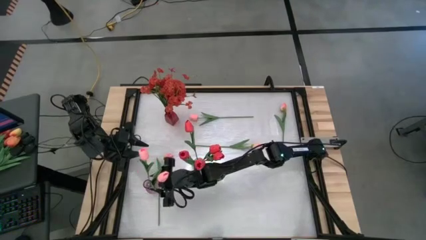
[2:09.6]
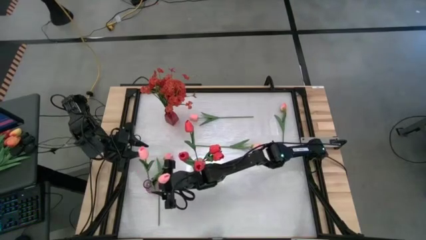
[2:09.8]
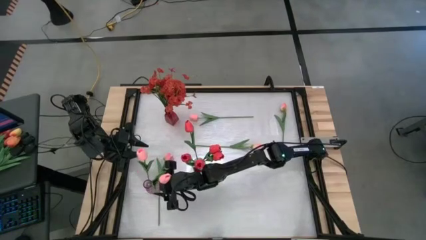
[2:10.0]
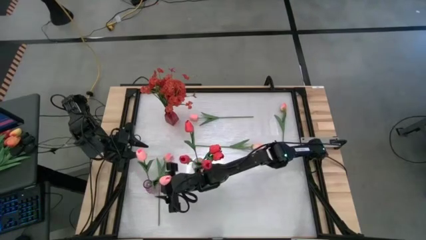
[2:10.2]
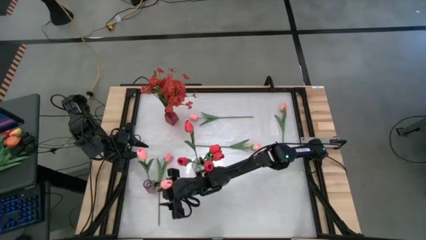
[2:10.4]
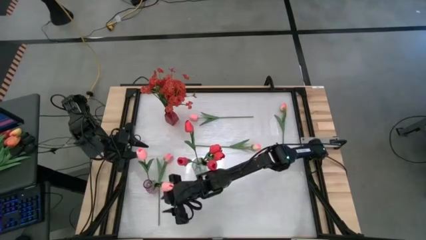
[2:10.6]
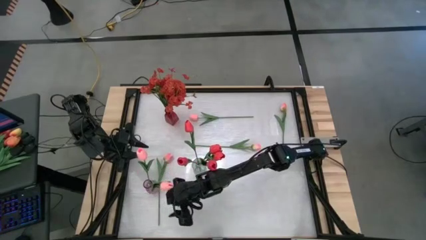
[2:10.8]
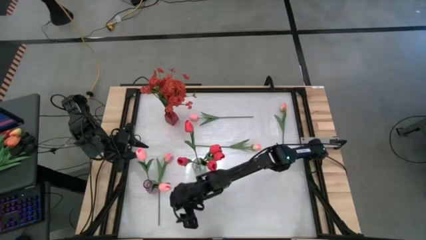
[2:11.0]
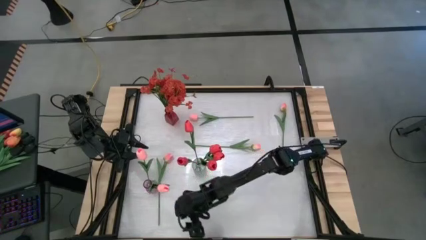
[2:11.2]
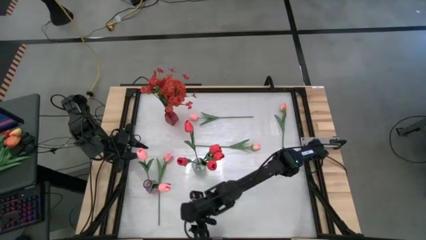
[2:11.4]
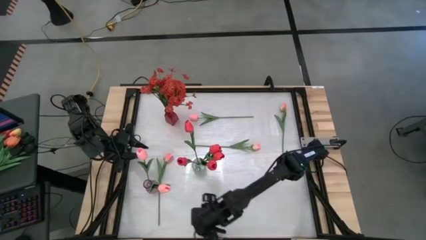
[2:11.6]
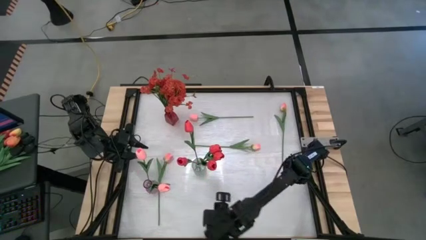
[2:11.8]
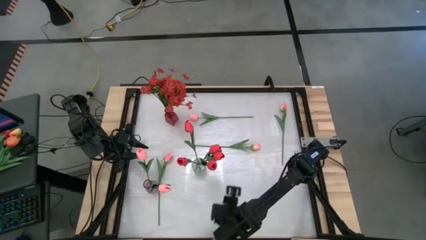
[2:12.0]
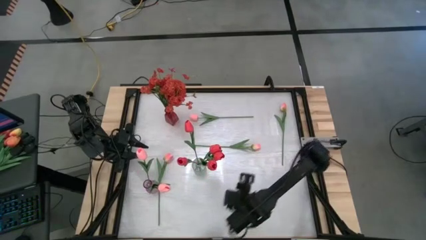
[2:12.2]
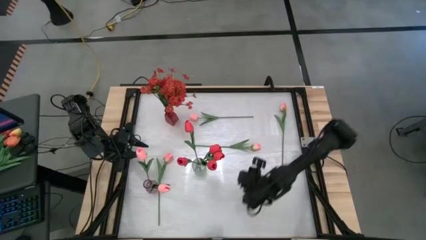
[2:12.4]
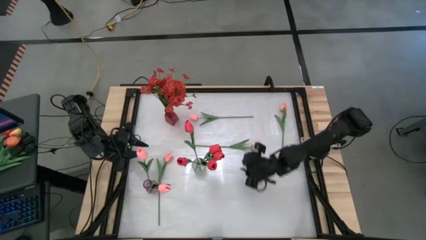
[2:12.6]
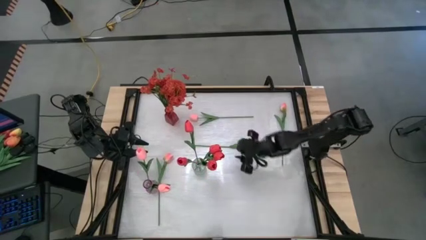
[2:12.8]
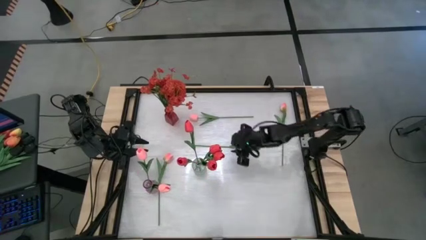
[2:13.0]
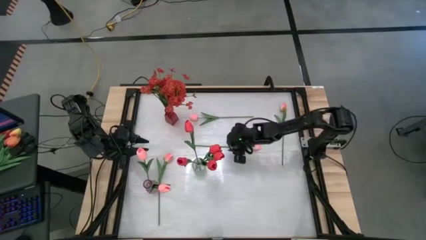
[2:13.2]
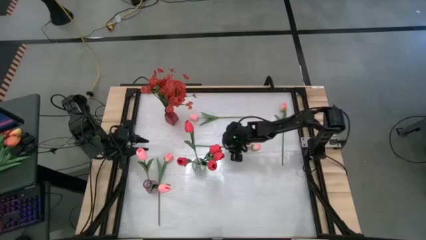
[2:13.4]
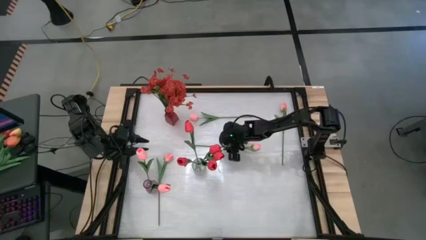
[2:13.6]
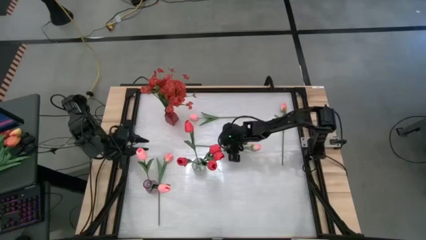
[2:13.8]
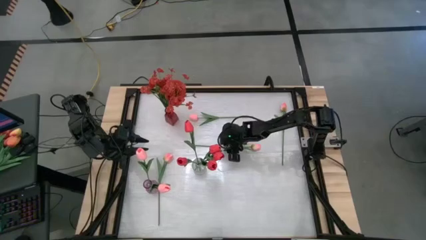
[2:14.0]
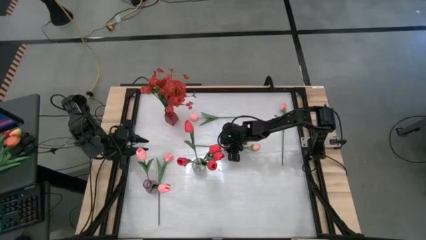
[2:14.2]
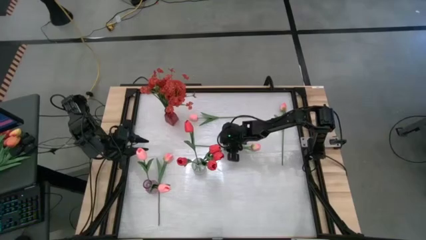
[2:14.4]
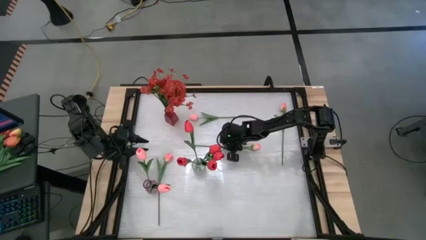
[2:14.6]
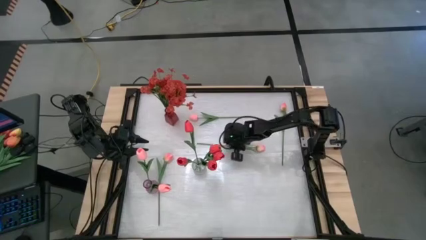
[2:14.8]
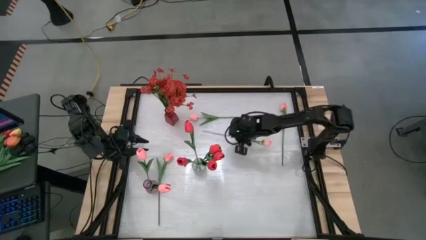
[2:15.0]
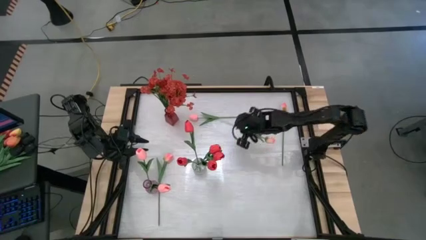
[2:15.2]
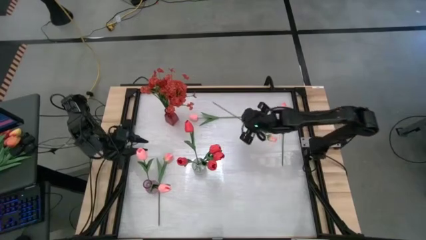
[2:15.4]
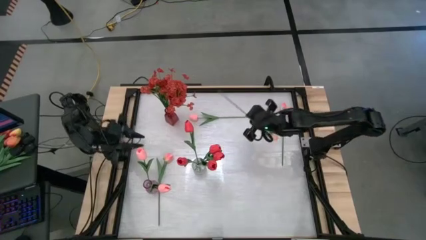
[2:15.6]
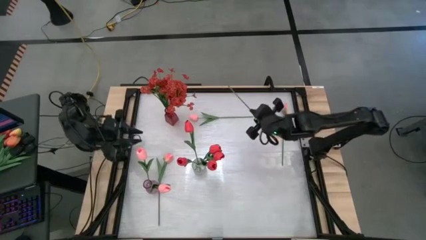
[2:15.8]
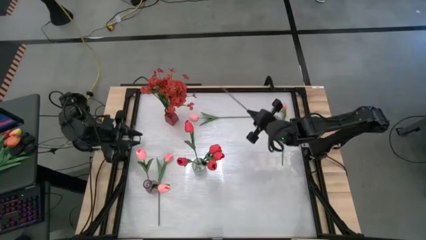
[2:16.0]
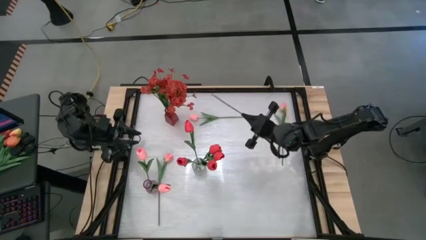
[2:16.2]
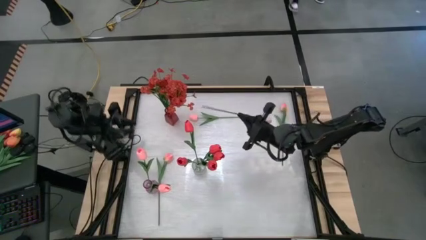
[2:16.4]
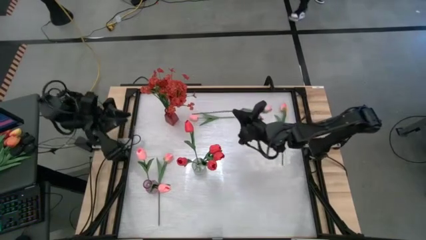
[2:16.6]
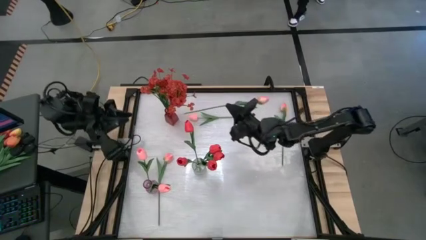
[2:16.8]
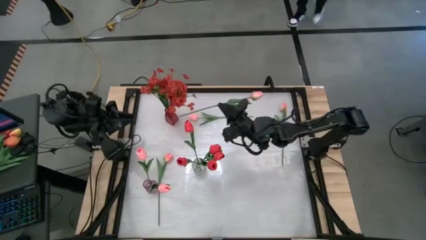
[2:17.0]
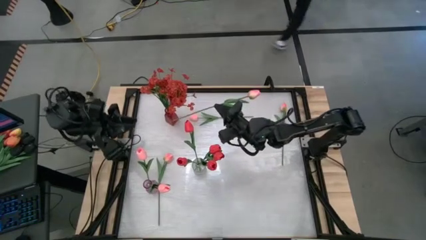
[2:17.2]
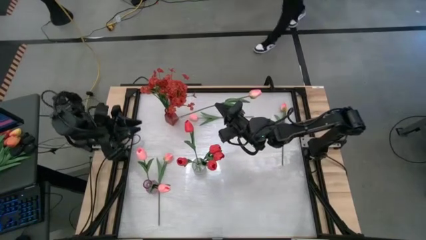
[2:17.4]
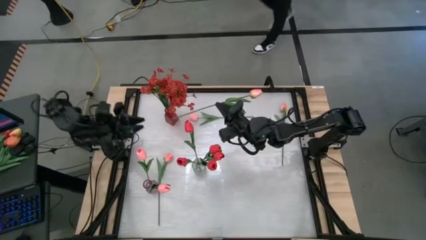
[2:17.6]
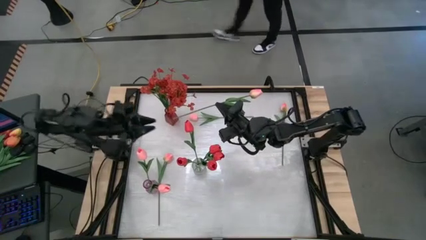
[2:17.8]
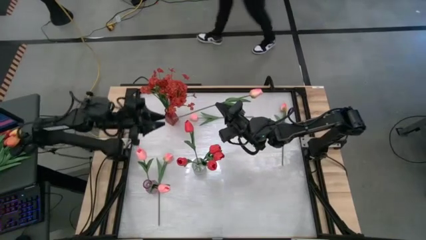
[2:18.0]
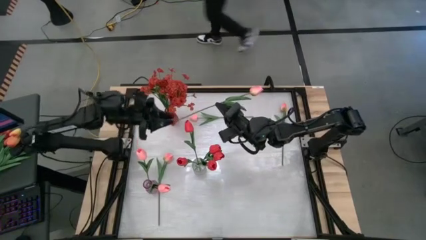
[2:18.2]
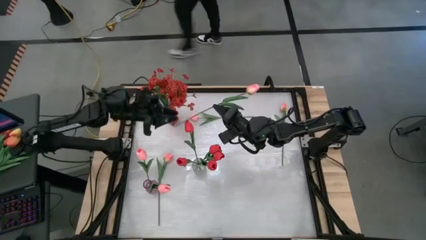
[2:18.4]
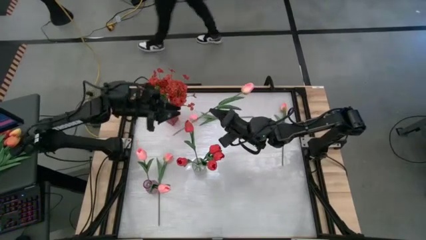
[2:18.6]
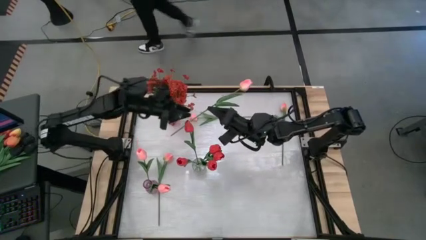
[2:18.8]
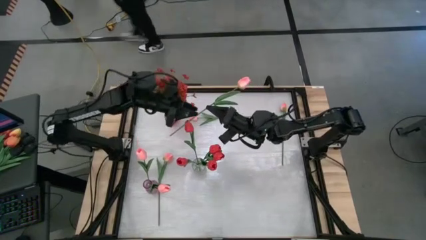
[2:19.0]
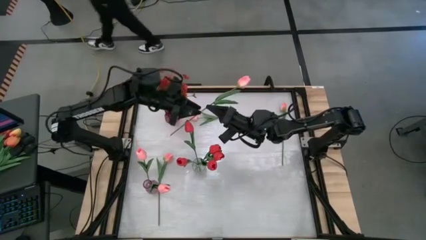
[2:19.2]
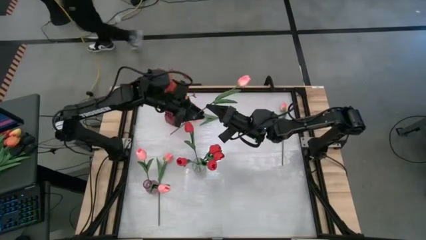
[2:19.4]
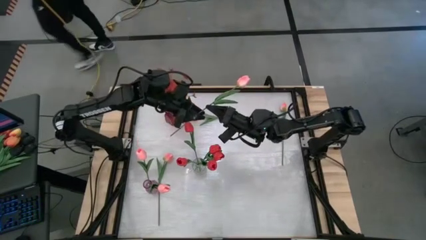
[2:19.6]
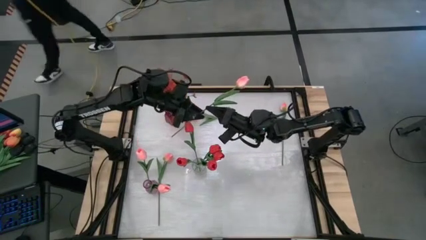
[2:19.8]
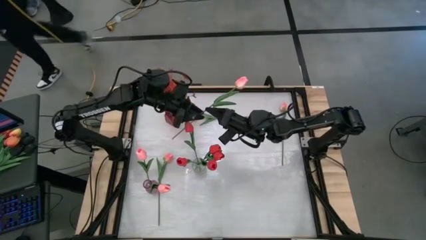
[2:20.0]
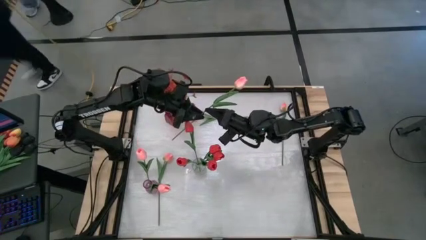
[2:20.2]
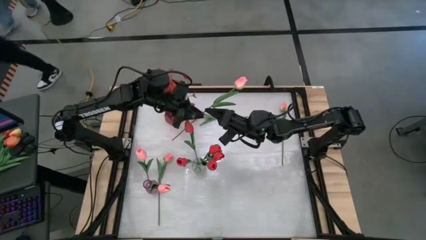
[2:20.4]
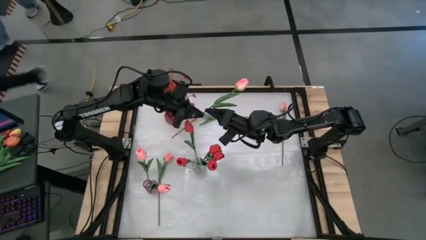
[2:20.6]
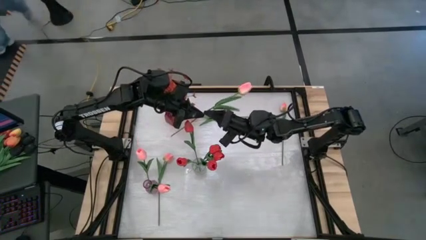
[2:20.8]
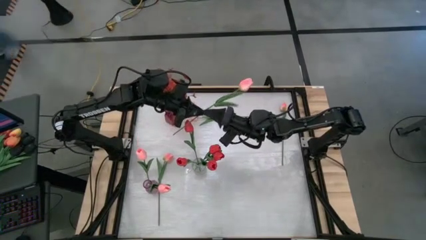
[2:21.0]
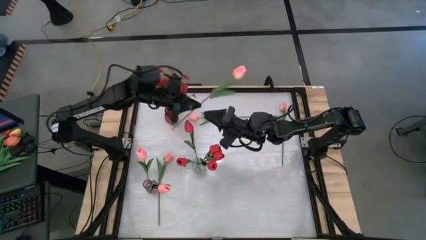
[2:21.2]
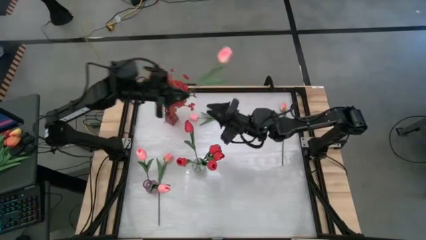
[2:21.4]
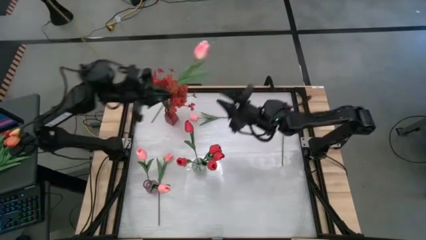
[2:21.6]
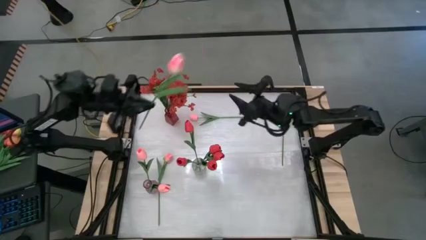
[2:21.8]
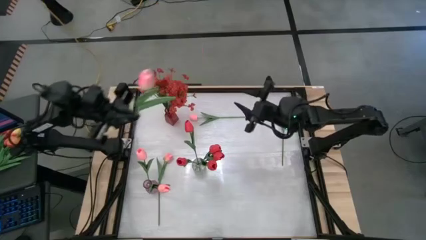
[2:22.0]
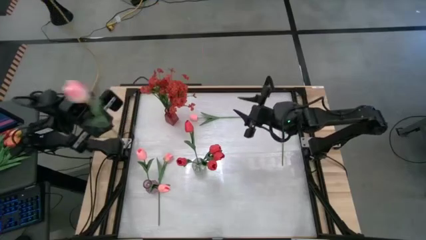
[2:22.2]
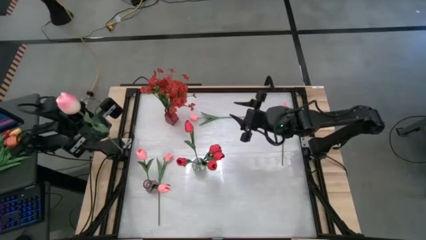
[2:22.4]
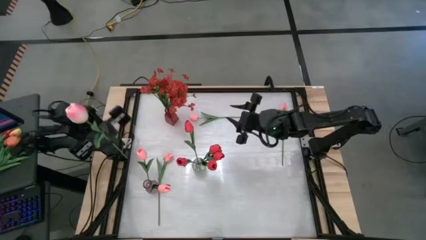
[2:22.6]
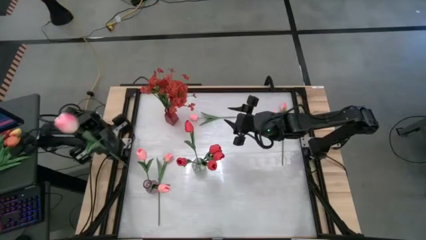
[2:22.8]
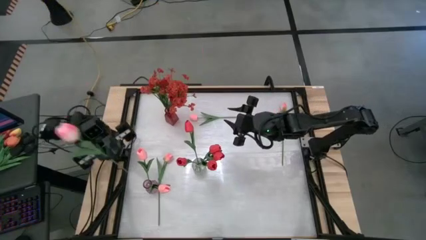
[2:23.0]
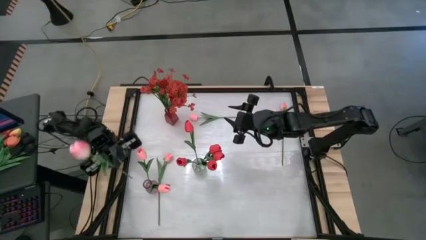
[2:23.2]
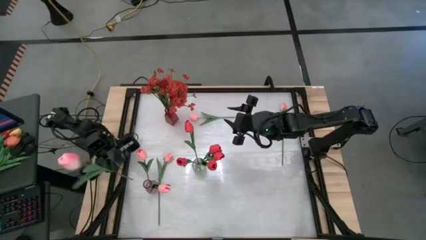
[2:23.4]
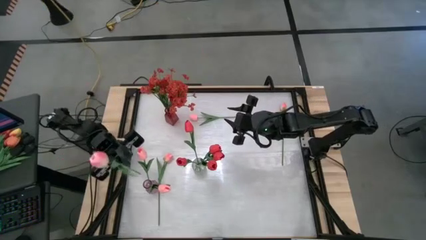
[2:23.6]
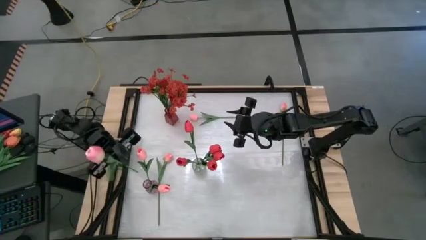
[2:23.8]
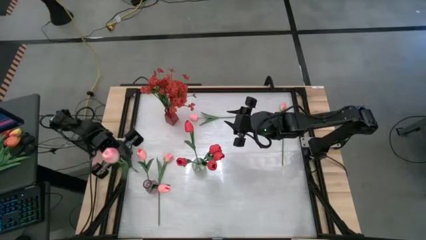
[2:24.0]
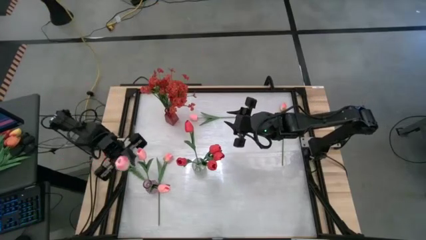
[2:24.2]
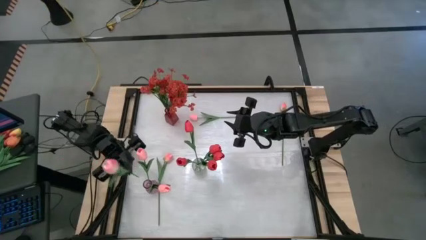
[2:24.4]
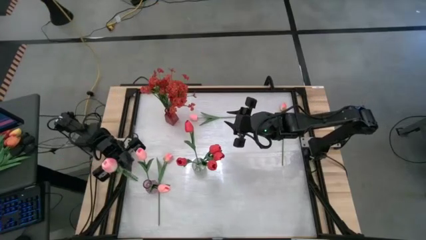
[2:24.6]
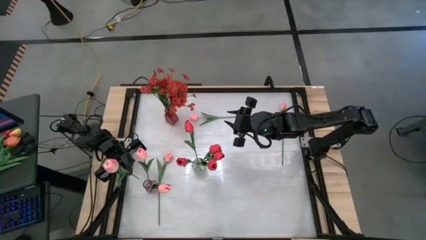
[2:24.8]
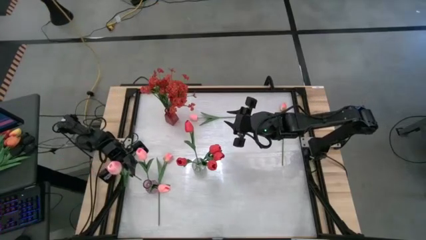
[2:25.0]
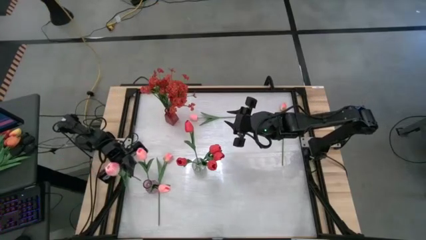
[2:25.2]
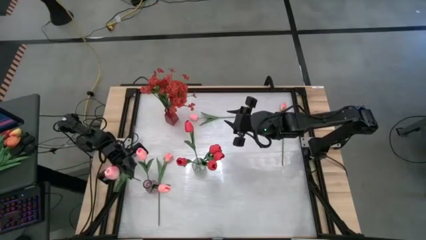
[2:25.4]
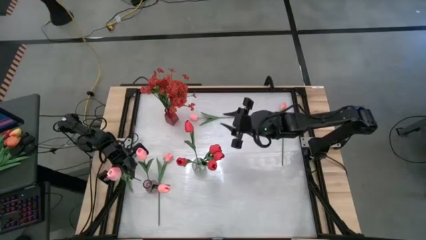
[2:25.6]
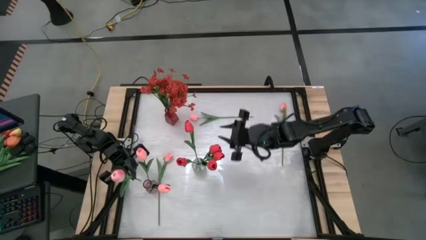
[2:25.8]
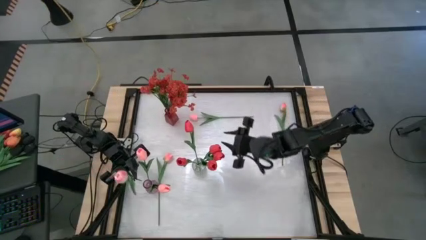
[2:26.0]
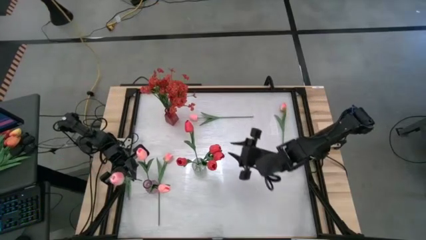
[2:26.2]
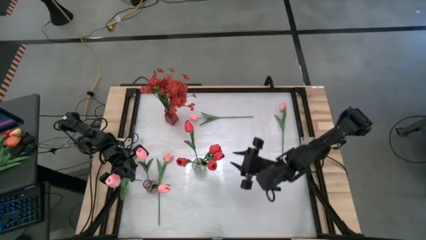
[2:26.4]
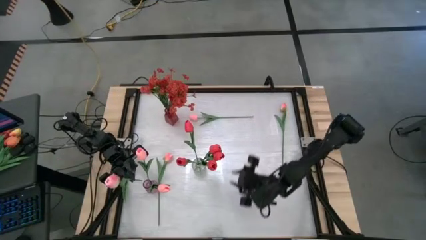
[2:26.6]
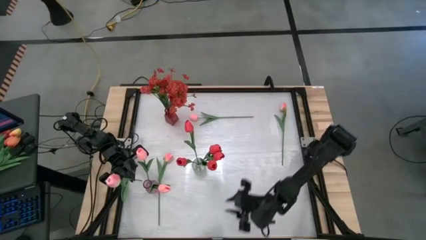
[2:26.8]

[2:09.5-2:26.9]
Task: Sort flowers into vase by color
Put the pink flower into the purple vase
